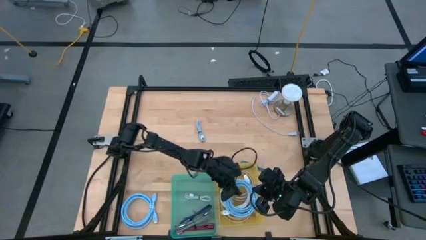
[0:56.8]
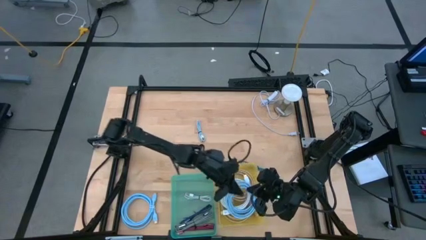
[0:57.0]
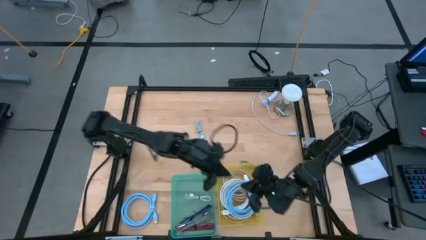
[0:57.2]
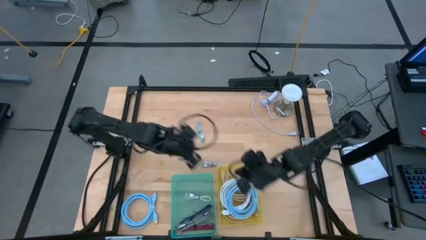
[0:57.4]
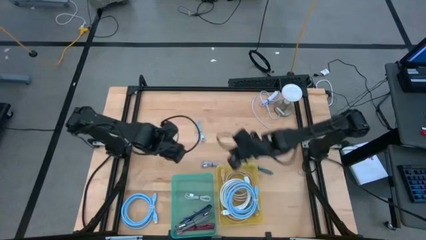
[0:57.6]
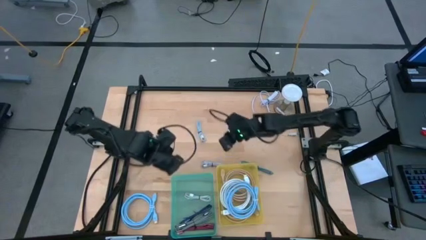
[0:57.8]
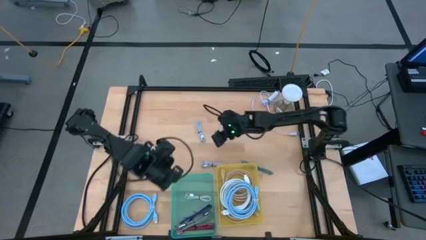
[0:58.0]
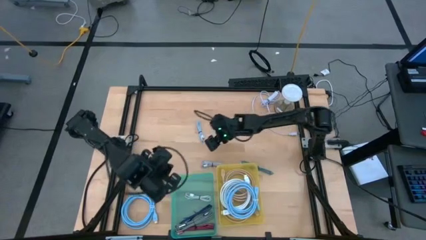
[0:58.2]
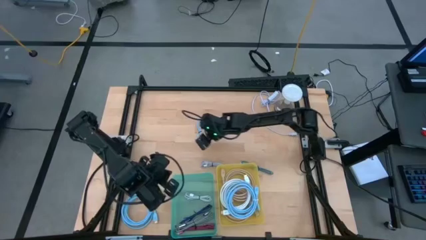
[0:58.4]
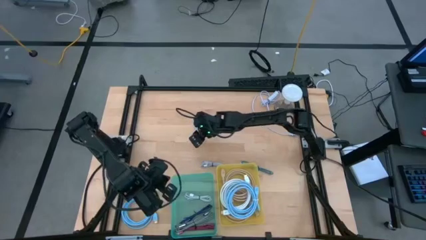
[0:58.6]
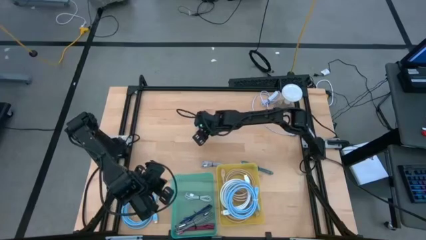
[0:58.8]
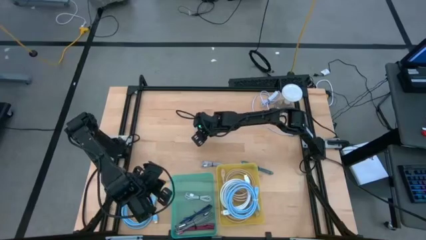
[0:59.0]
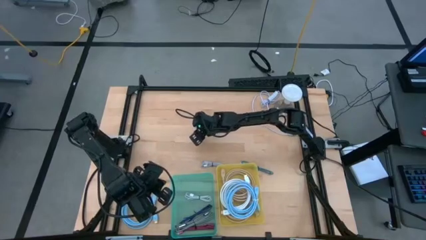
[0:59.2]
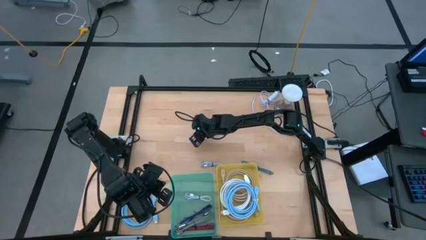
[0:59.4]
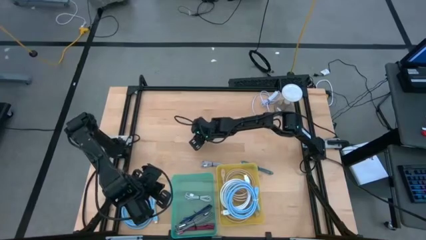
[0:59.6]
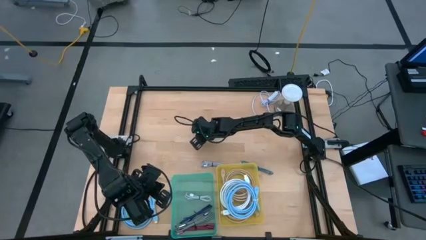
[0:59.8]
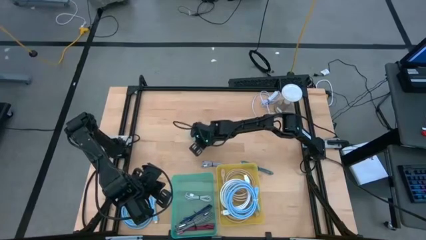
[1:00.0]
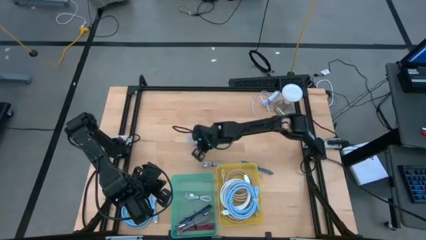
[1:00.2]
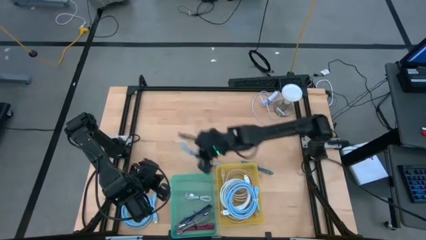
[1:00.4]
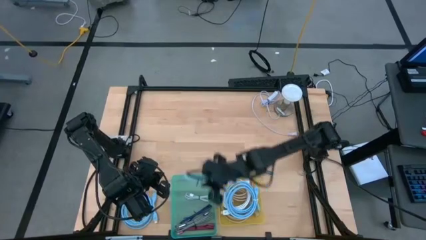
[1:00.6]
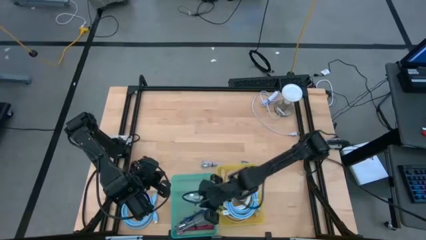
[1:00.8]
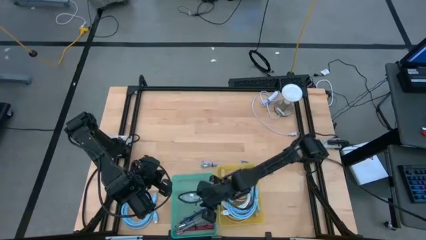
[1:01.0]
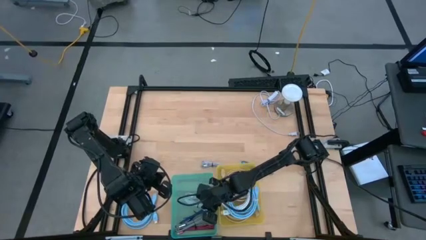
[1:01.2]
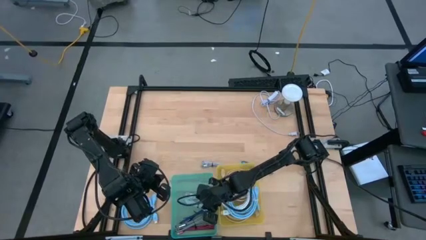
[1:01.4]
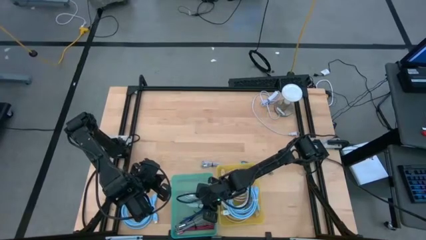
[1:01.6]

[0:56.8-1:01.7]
Task: Pick & Place USB Port
Put the light blue USB cable into the green bin

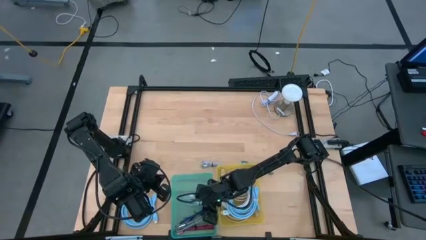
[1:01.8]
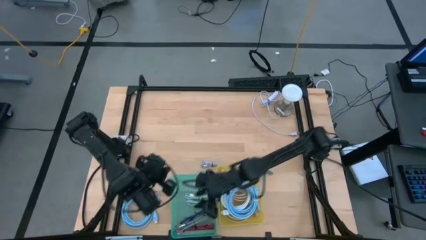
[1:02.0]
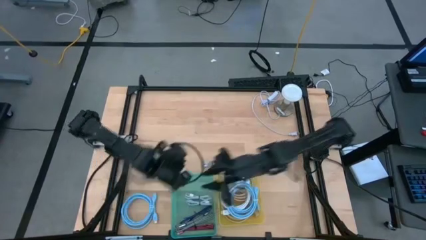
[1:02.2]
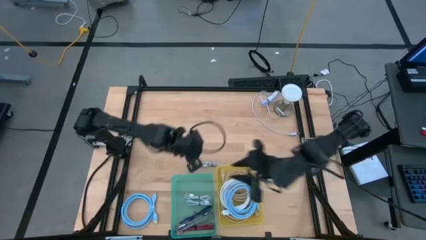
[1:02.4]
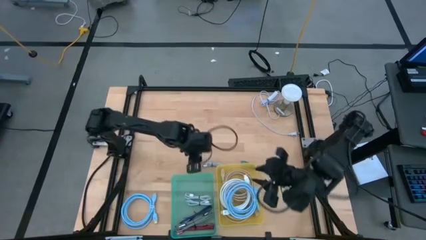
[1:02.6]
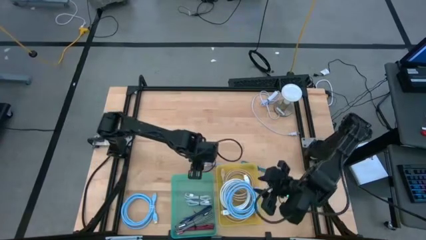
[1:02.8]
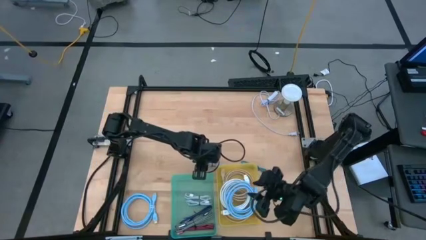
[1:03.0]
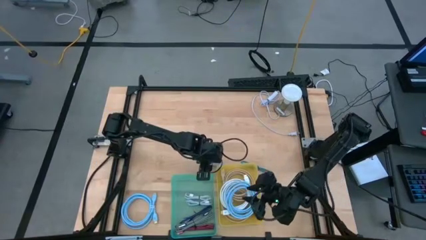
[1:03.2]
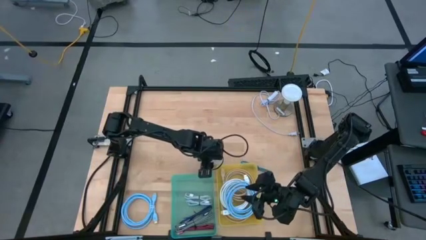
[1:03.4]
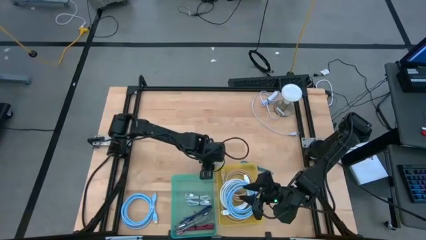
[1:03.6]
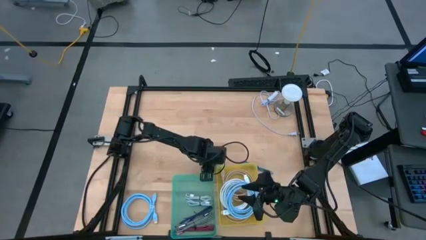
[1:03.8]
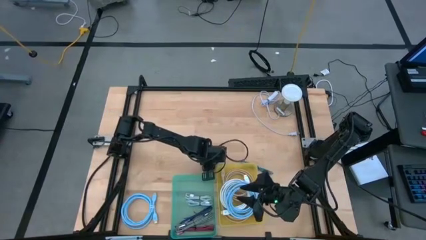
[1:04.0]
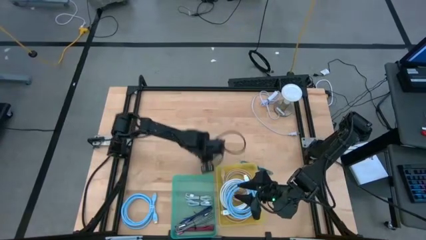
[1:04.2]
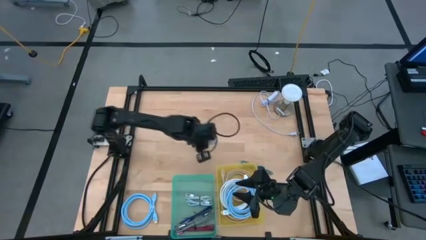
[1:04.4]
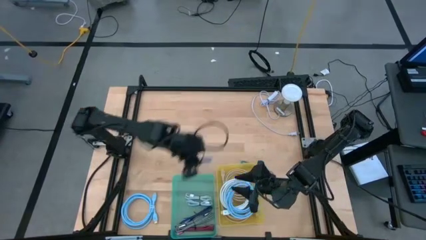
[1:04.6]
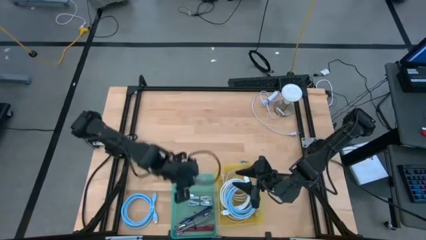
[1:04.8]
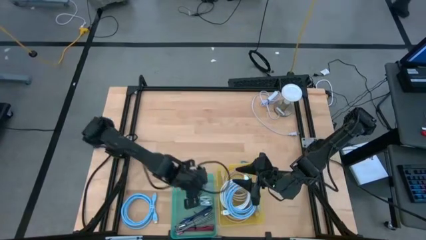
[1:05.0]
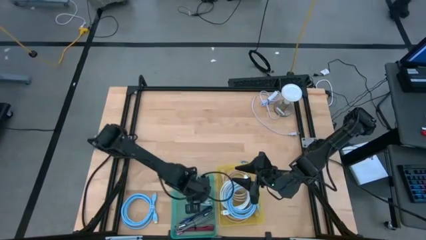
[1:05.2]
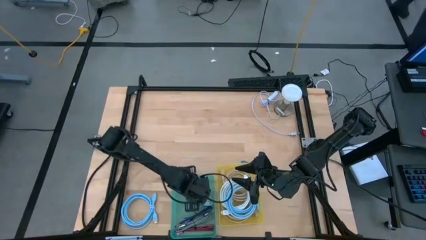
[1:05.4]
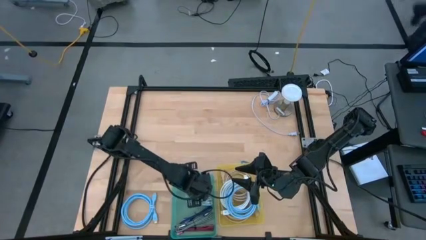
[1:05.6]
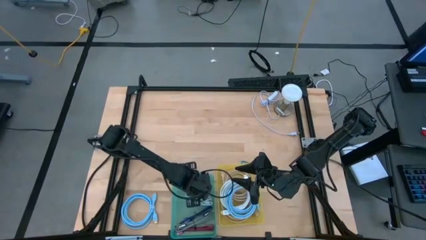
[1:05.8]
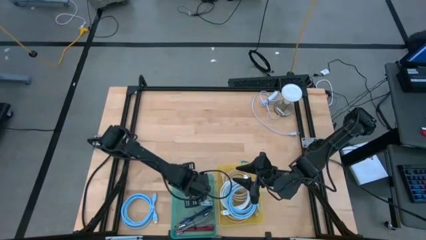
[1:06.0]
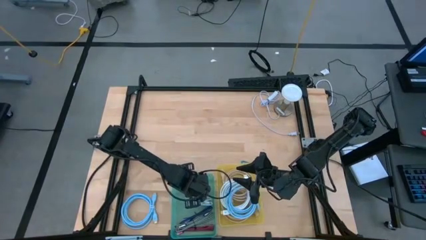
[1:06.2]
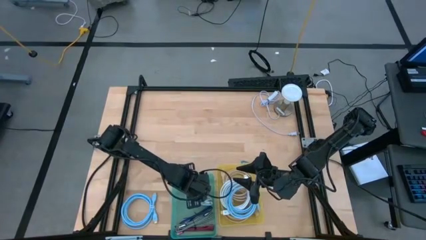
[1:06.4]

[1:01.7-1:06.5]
Put the purple USB cable into the green bin

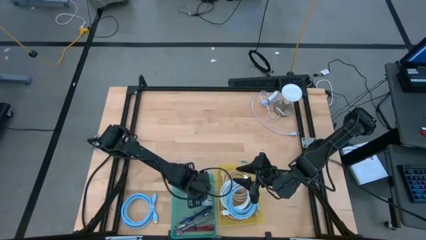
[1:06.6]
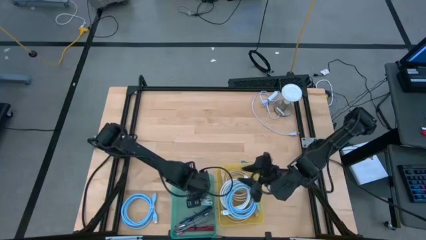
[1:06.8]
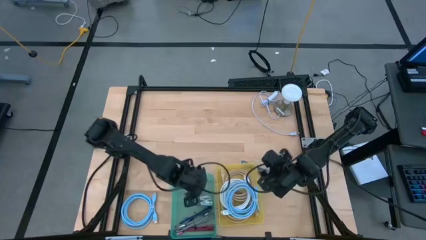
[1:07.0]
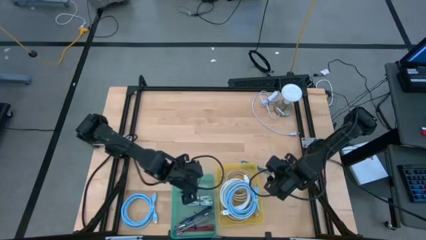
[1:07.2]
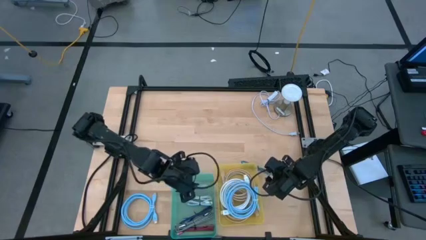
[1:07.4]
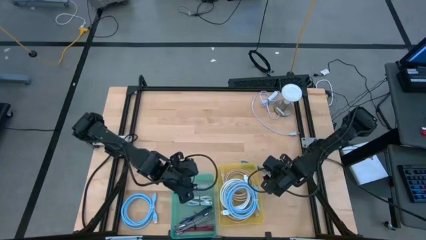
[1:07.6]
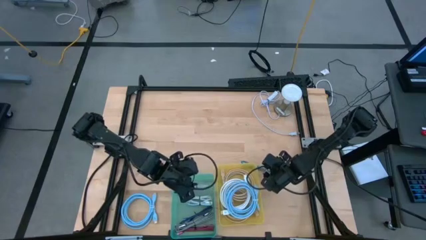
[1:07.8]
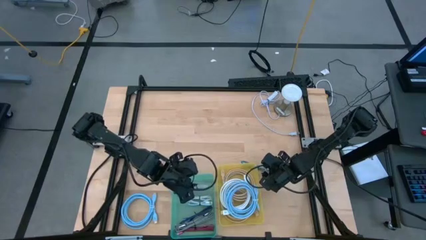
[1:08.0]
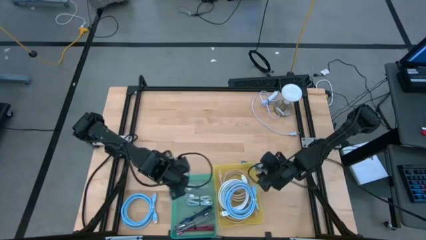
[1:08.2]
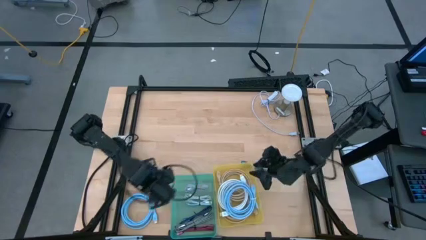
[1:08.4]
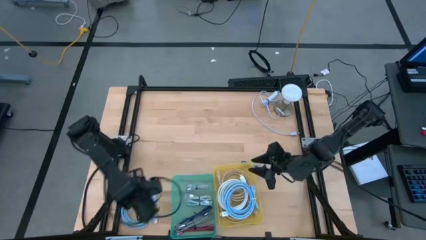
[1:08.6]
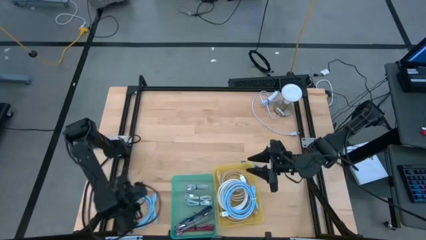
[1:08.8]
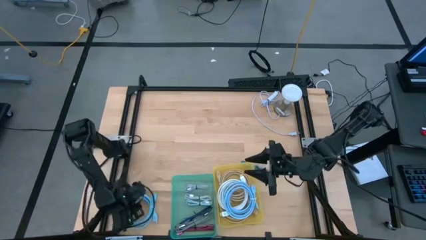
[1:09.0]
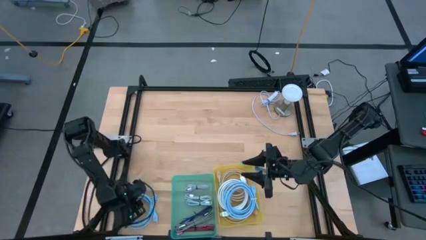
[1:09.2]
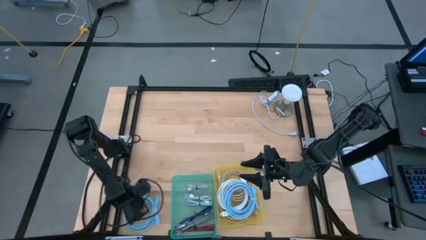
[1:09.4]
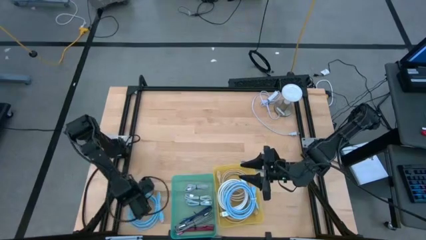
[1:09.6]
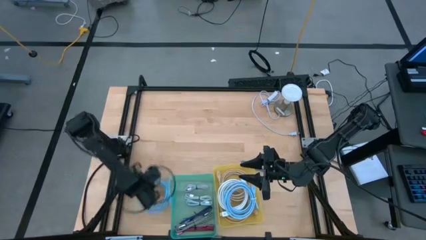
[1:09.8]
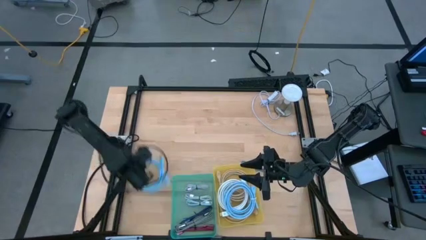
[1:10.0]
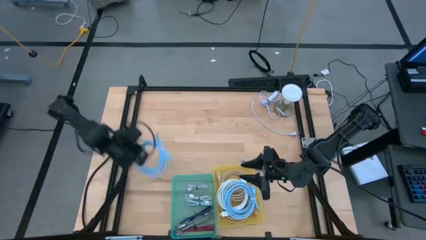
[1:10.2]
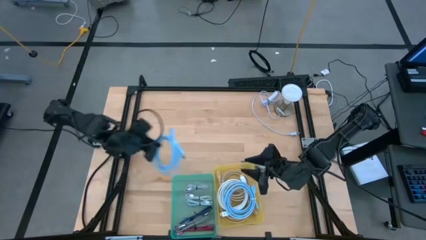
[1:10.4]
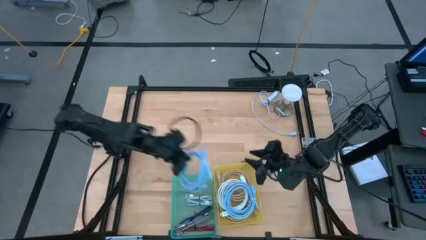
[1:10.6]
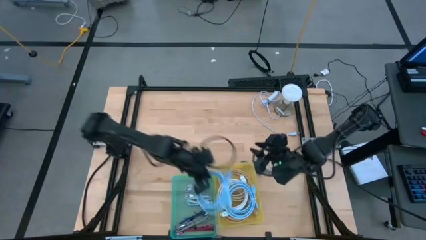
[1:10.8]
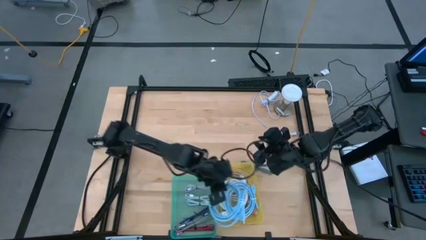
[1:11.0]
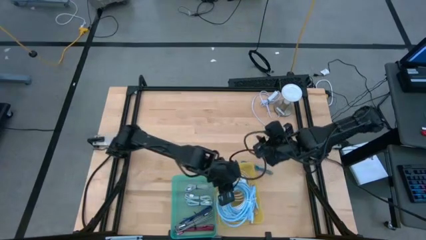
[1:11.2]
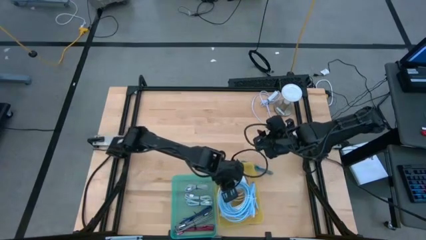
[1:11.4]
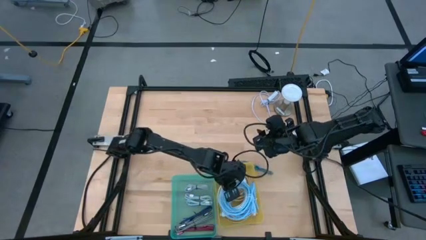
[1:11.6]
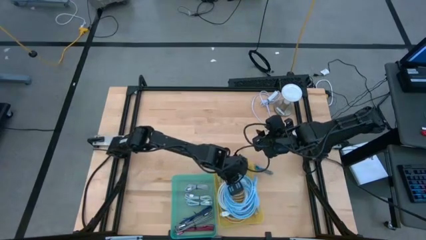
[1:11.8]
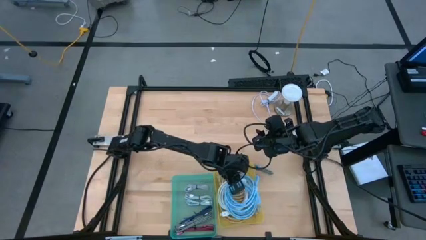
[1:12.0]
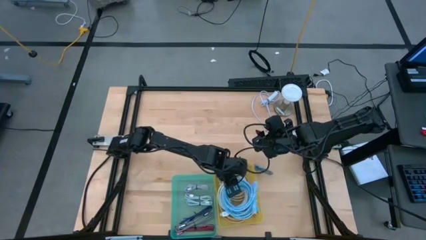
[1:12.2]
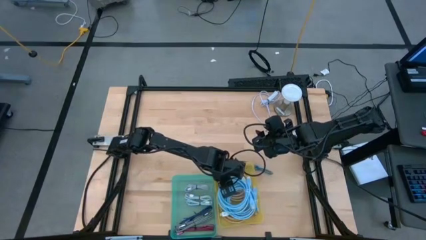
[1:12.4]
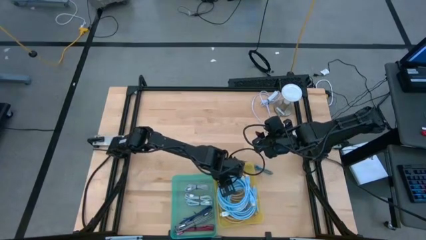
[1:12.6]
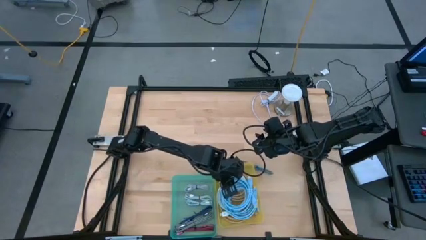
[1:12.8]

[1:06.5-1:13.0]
Put the blue HDMI cable into the yellow bin
